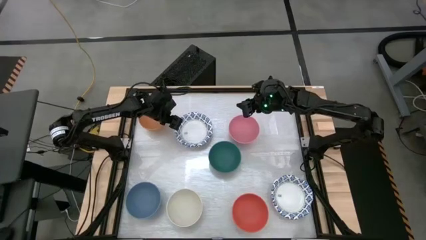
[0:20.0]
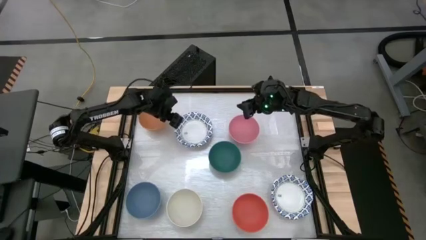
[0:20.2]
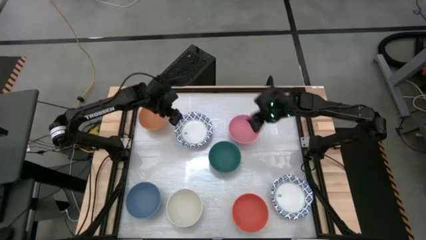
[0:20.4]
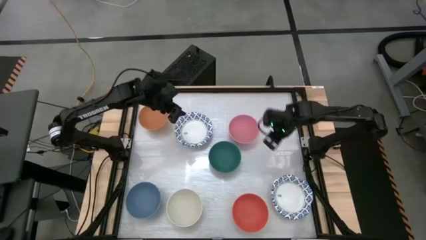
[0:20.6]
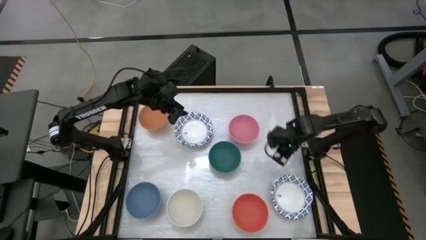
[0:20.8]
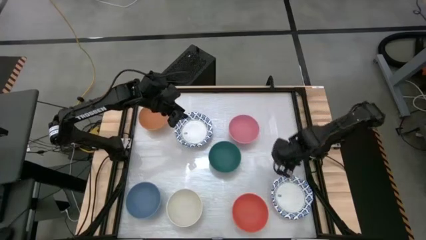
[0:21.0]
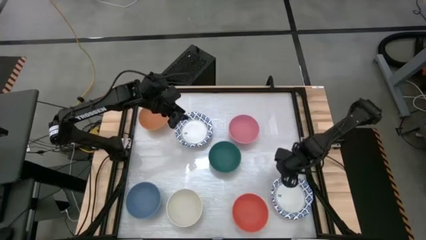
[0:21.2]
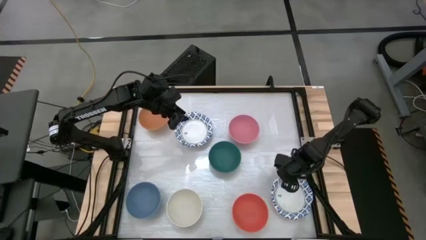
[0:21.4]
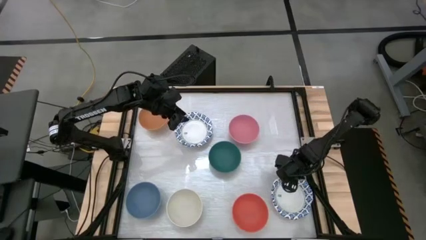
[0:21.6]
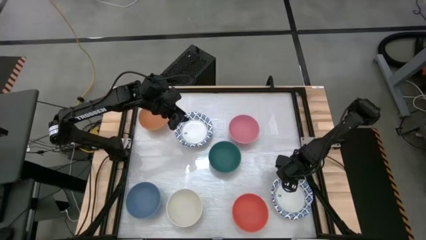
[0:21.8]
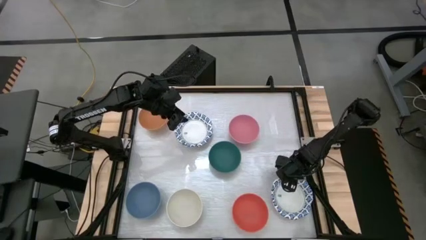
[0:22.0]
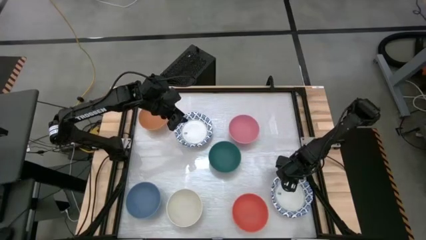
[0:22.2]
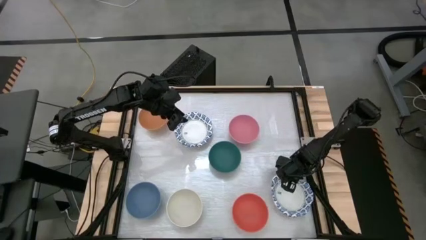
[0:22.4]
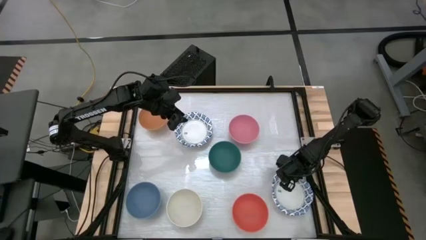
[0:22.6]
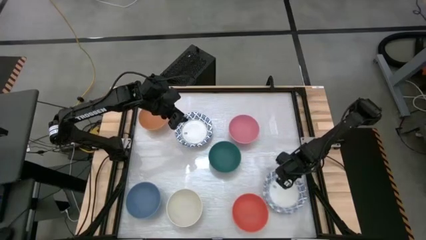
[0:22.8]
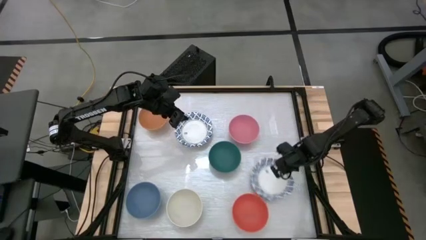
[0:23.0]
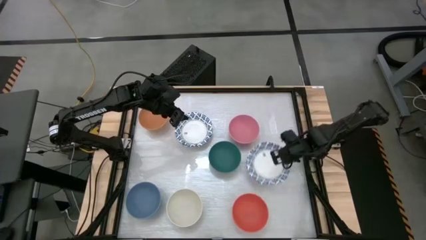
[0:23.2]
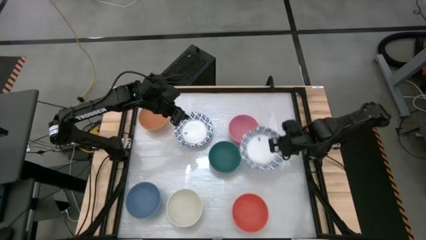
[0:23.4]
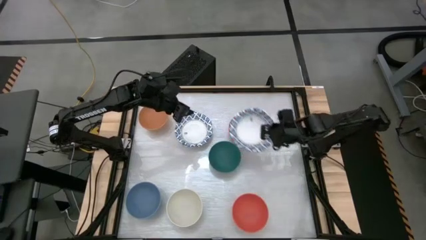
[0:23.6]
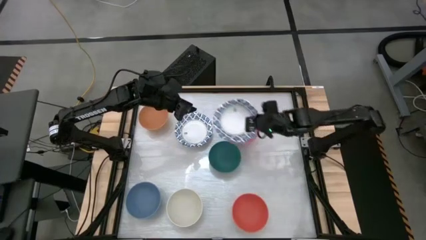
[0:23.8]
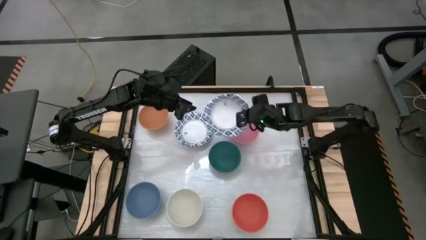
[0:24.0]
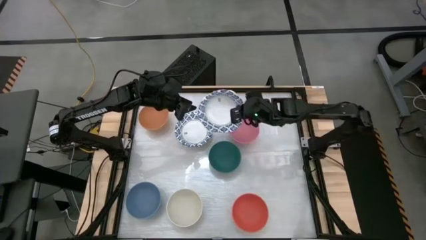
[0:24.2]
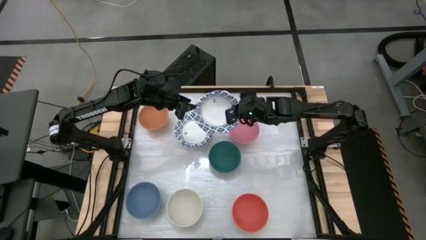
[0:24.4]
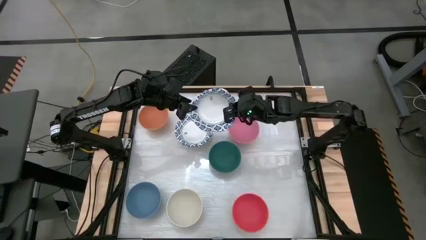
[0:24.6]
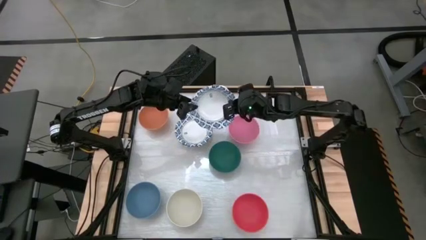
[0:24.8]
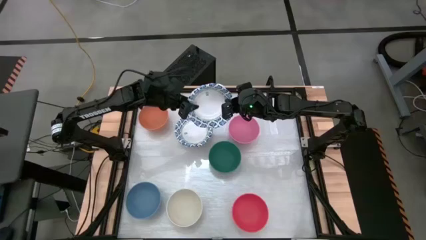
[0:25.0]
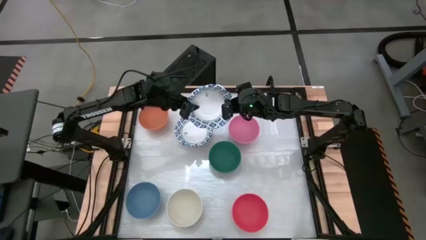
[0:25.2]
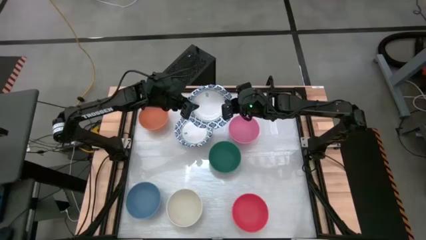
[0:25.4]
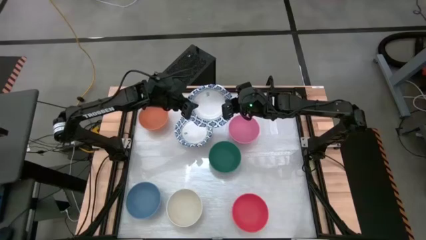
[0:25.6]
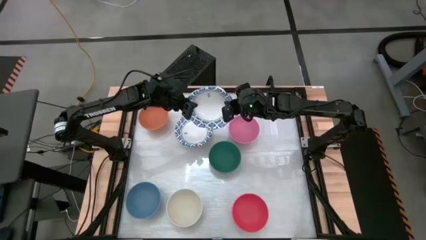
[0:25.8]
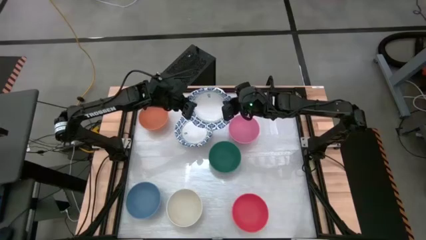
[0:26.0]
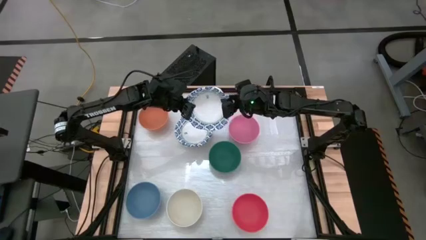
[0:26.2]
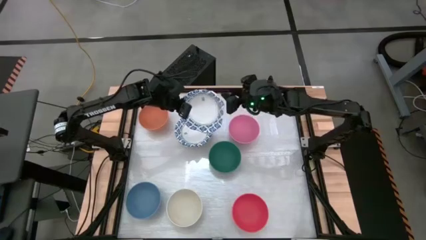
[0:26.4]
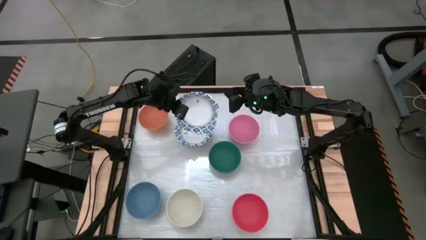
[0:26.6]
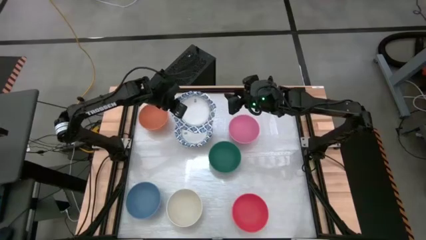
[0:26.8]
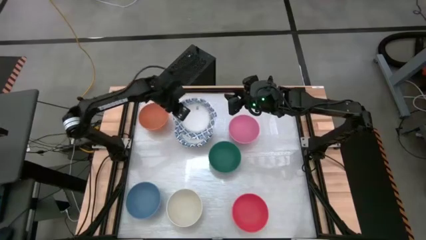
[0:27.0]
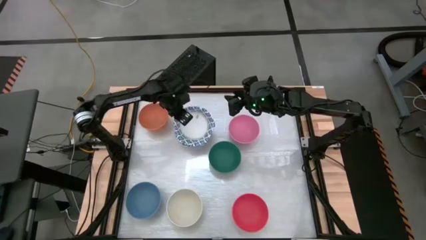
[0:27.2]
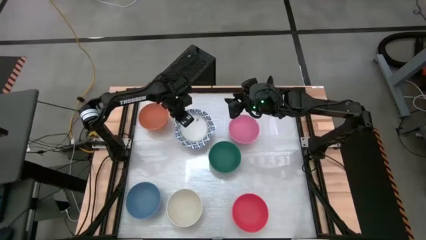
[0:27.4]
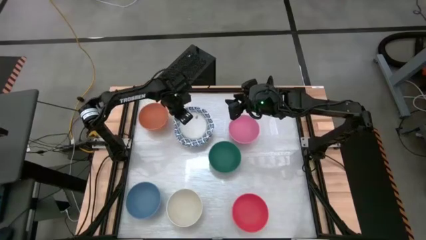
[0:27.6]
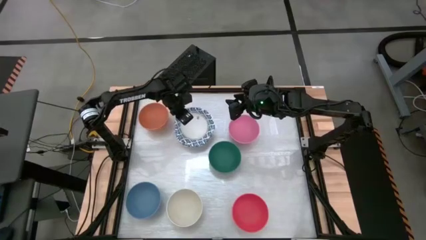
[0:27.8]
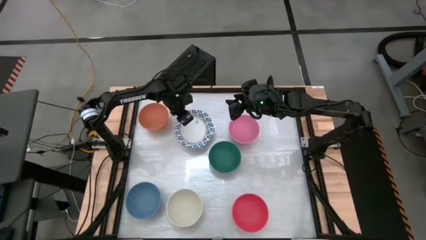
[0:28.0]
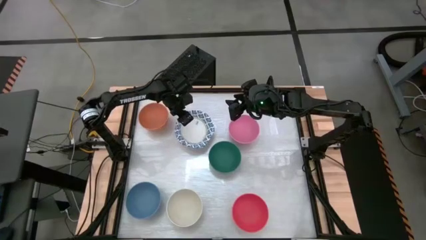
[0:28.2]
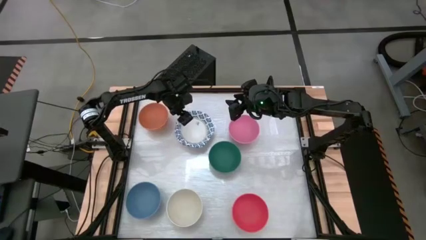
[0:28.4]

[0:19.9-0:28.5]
Stack the bottom white patterned bowl on top of the other white patterned bowl

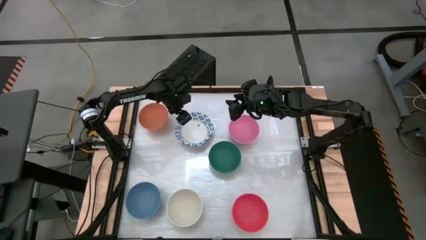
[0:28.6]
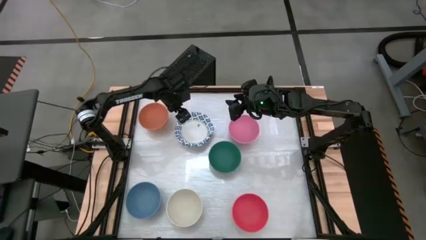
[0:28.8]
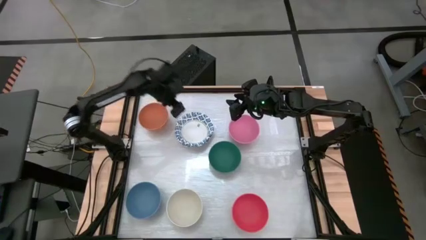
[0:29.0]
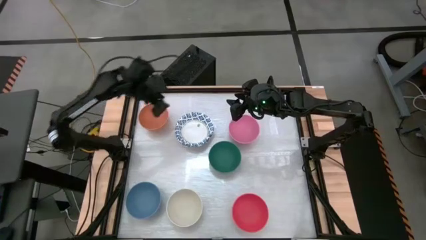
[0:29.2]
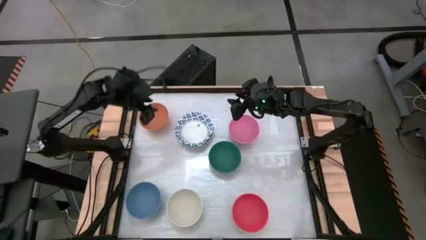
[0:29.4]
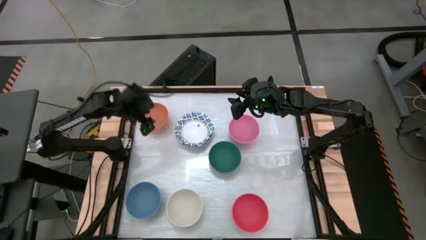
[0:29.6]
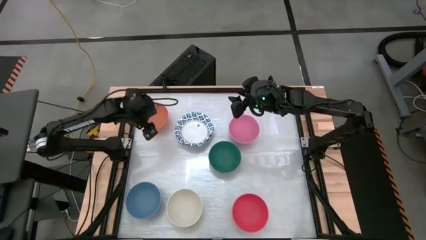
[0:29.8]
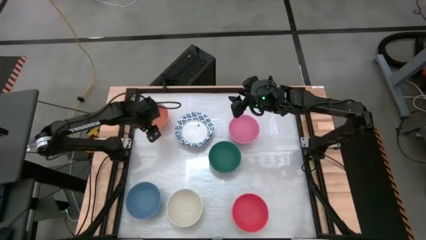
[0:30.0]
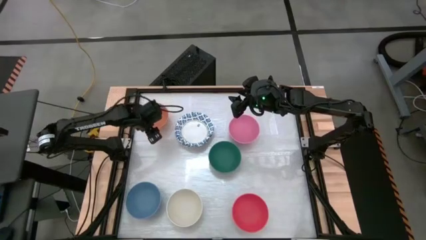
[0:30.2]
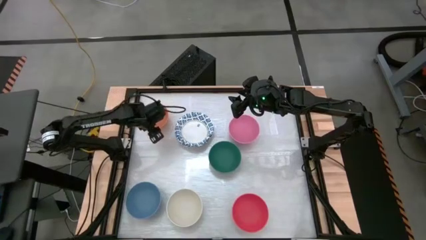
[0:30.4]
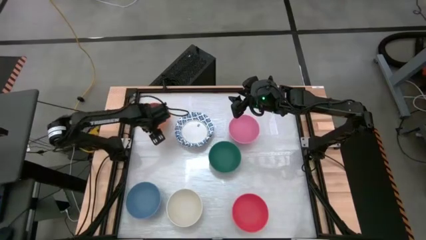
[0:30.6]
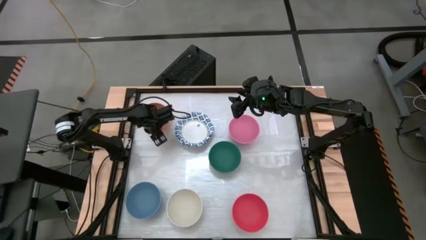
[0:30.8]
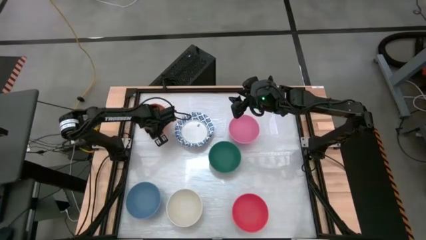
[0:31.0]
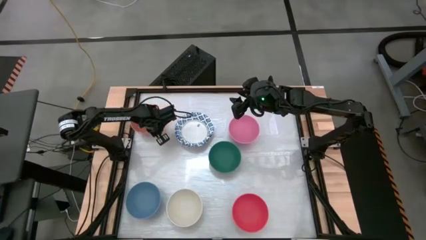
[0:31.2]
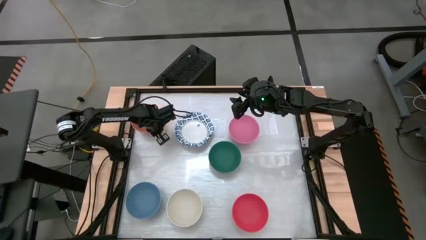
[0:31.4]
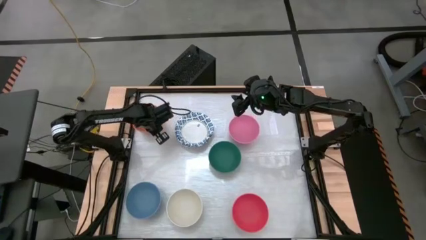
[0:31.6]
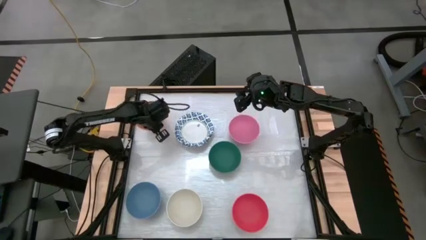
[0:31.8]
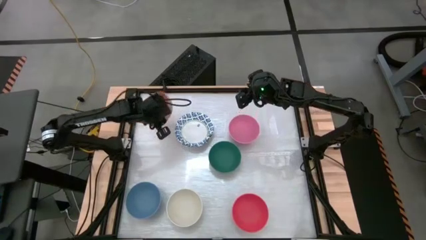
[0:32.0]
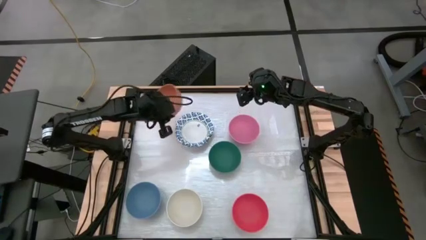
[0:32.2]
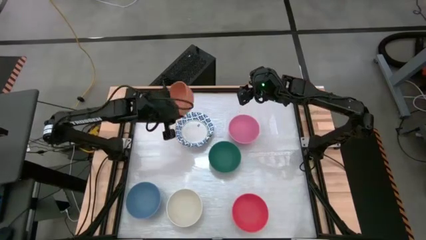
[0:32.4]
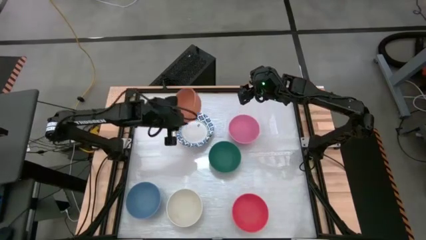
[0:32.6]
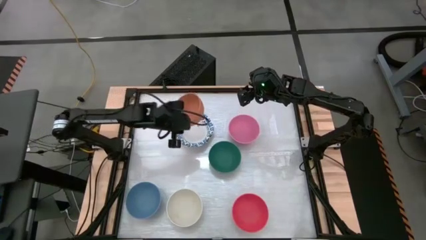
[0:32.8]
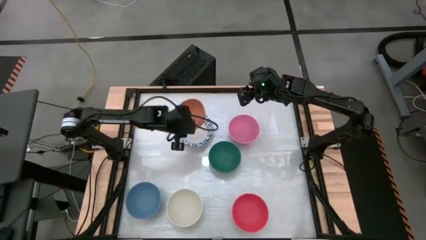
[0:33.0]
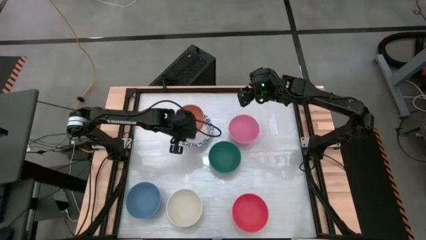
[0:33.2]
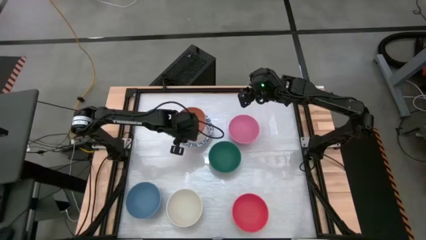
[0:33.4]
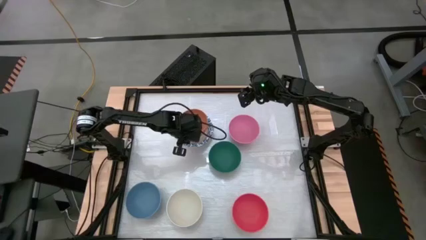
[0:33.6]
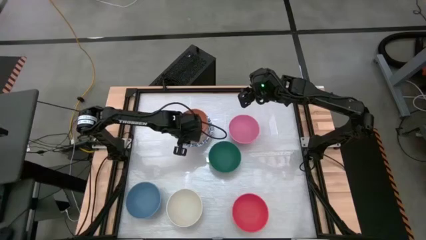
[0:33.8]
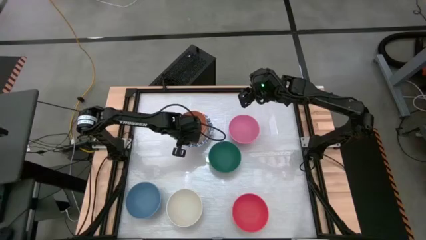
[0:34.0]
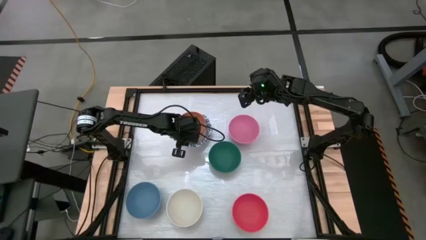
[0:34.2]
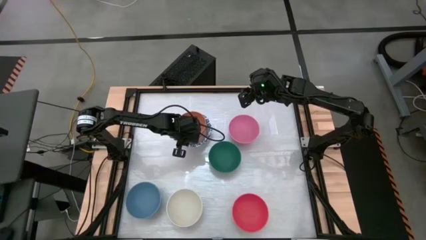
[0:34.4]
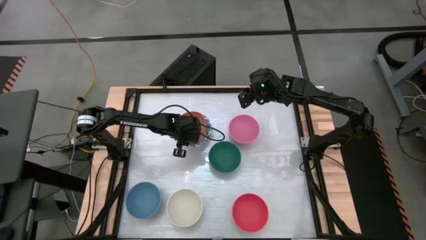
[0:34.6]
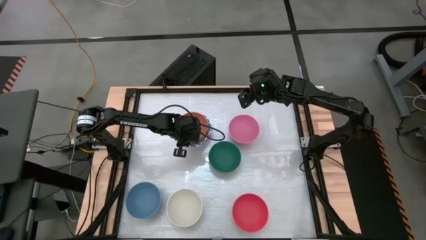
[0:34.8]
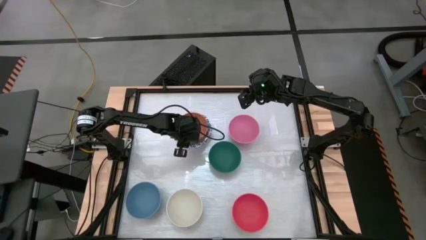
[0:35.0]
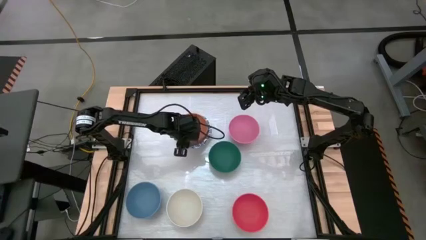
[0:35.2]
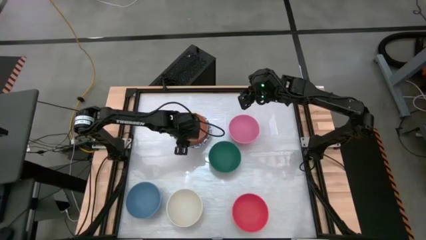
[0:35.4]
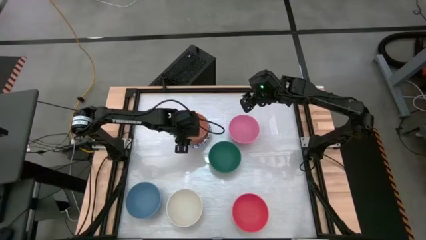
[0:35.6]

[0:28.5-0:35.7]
Stack the brown bowl on top of the white patterned bowl
